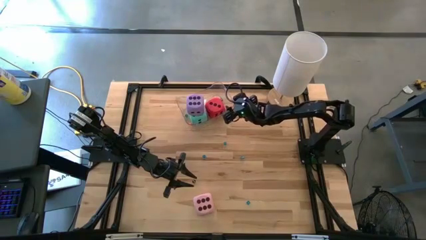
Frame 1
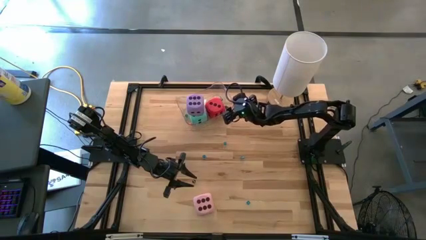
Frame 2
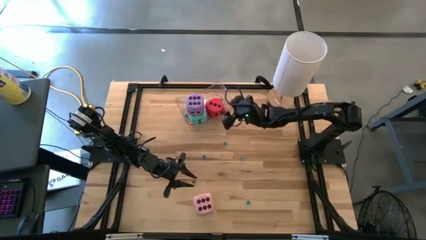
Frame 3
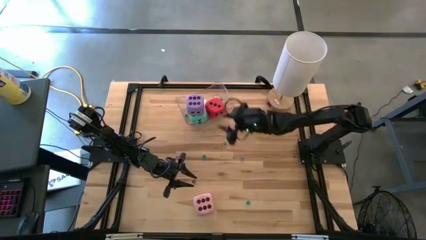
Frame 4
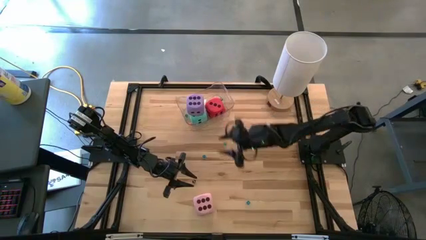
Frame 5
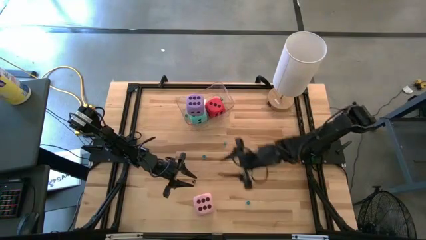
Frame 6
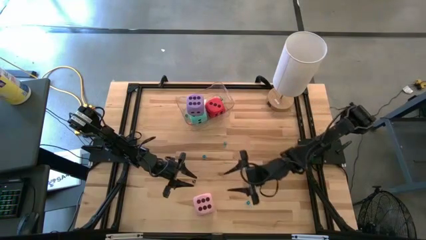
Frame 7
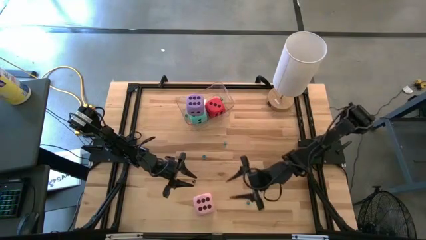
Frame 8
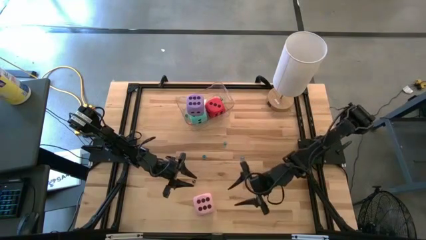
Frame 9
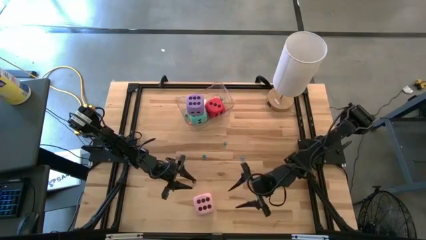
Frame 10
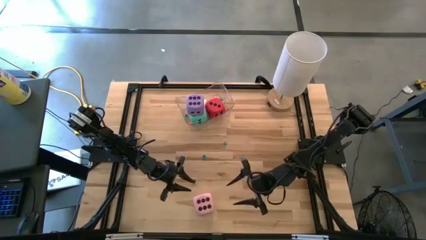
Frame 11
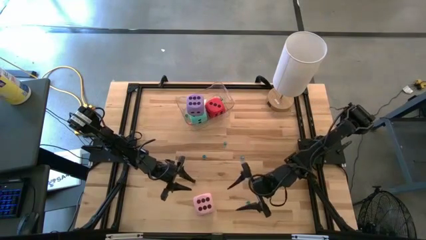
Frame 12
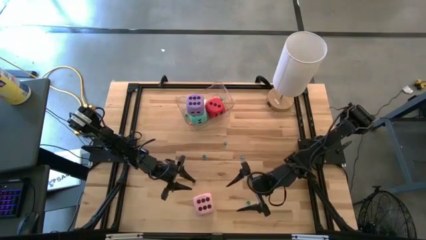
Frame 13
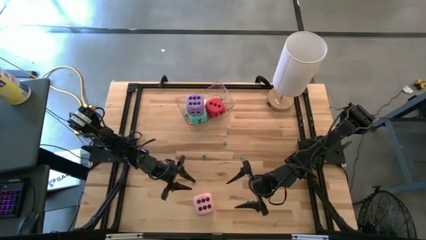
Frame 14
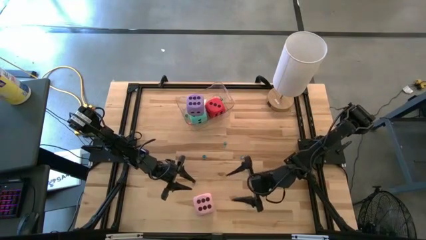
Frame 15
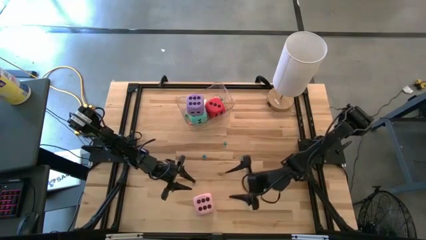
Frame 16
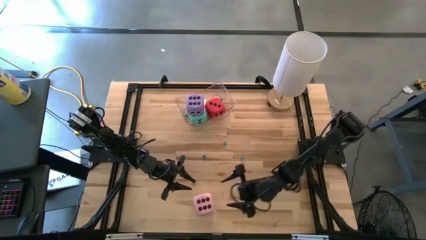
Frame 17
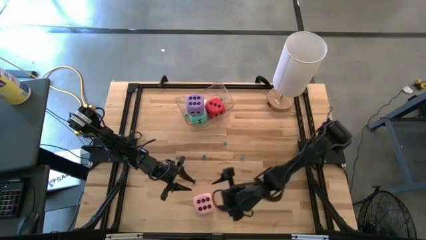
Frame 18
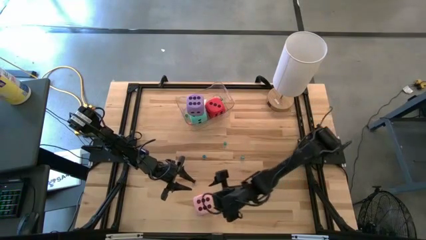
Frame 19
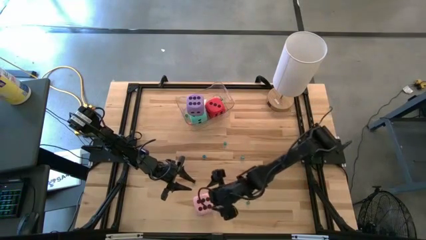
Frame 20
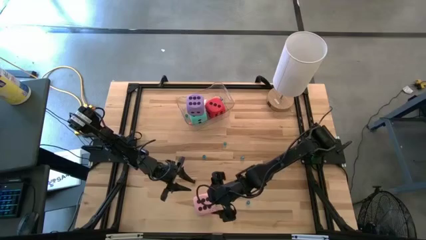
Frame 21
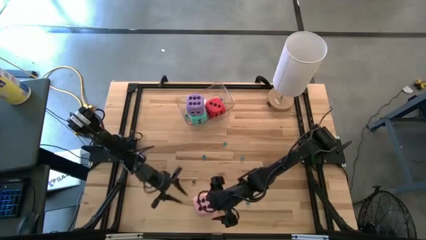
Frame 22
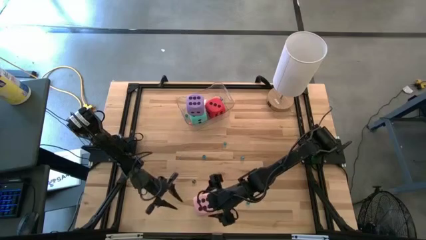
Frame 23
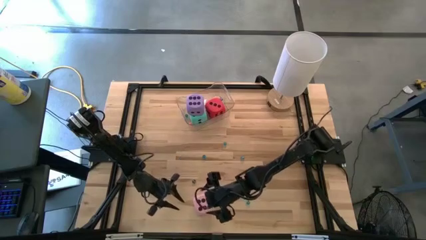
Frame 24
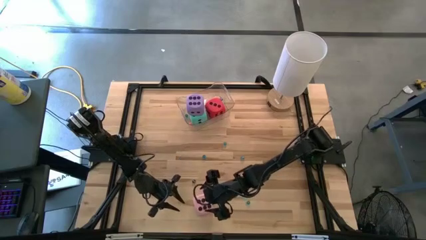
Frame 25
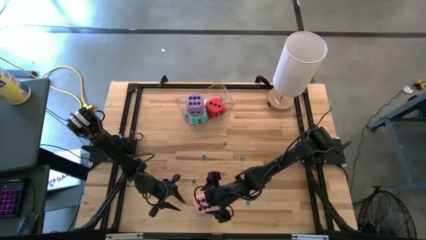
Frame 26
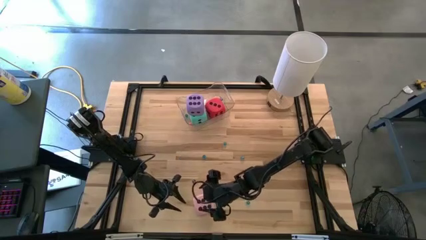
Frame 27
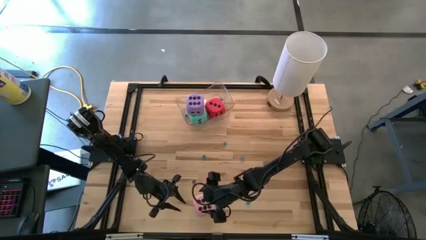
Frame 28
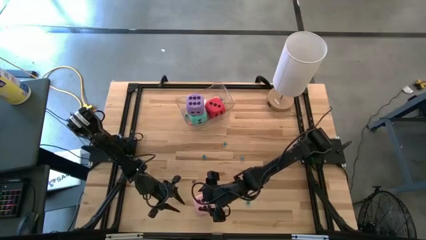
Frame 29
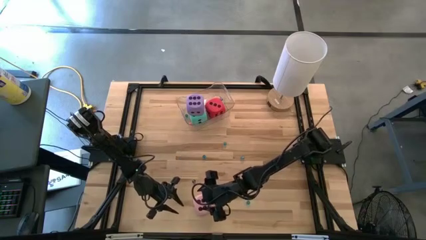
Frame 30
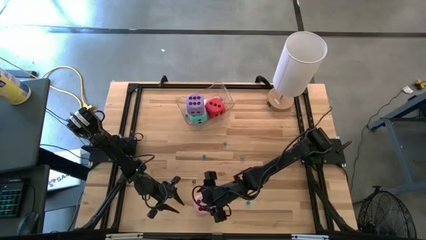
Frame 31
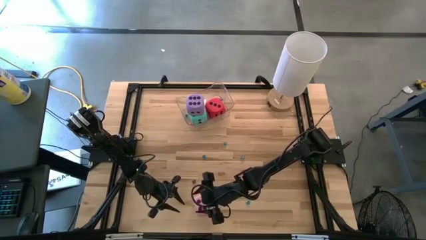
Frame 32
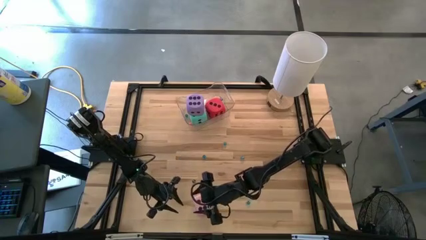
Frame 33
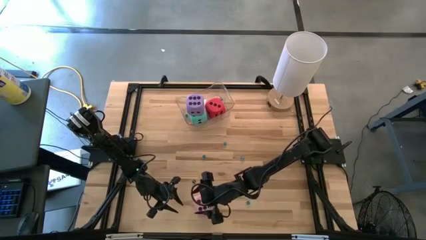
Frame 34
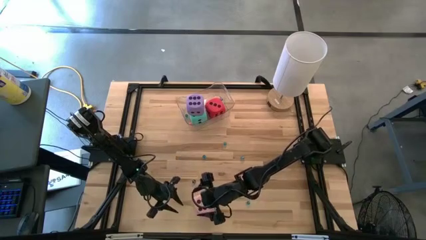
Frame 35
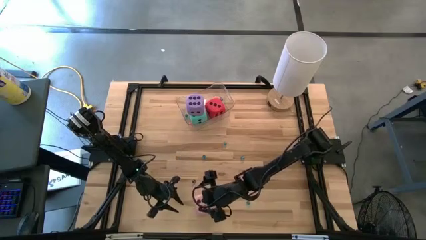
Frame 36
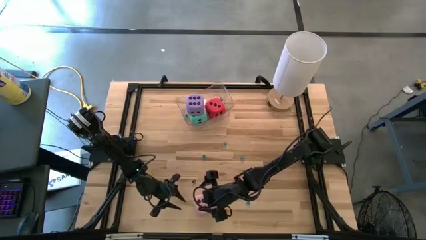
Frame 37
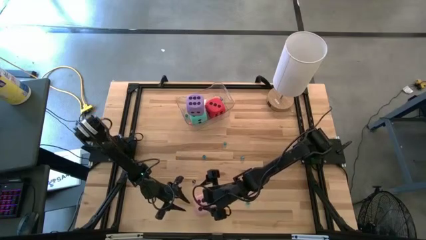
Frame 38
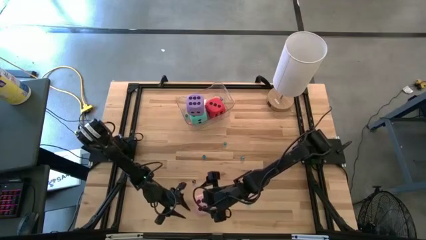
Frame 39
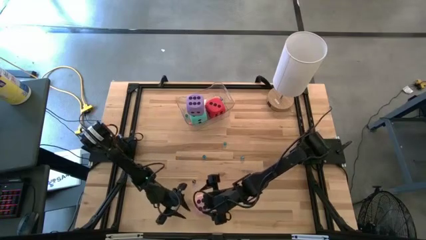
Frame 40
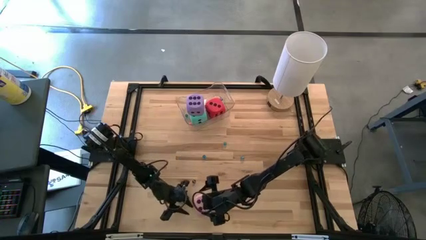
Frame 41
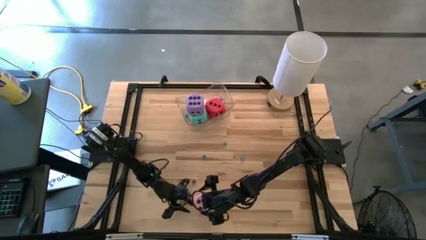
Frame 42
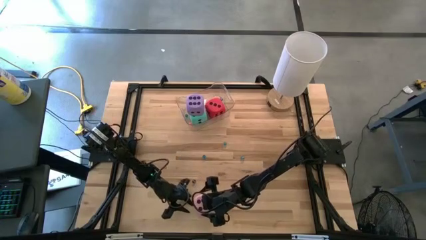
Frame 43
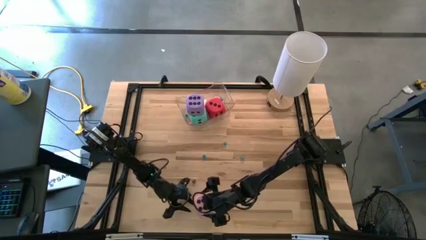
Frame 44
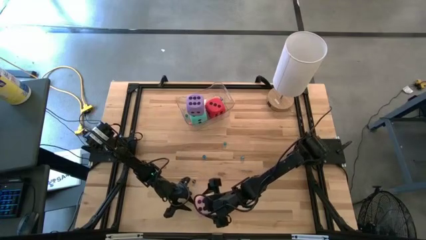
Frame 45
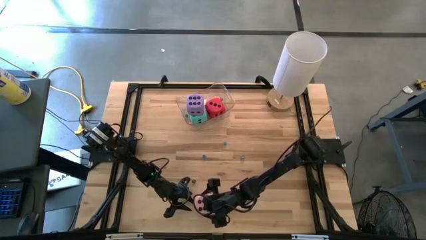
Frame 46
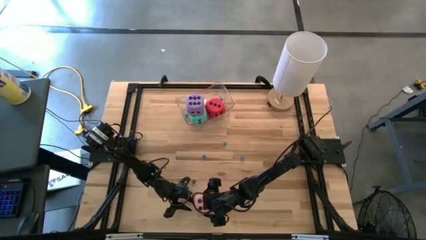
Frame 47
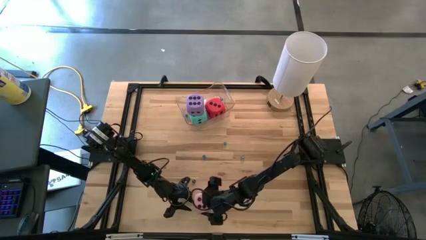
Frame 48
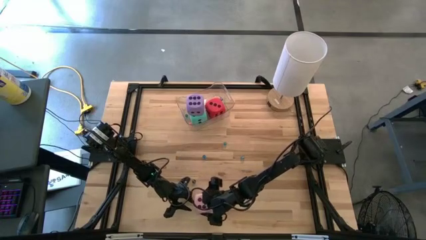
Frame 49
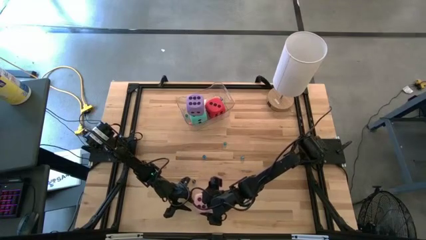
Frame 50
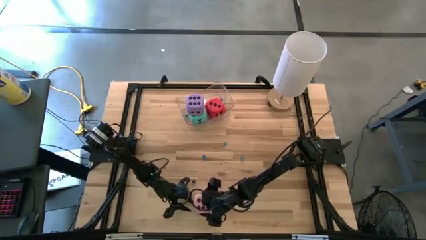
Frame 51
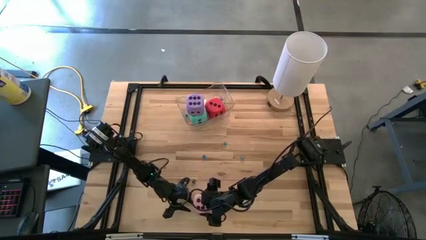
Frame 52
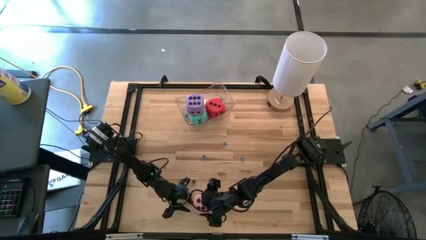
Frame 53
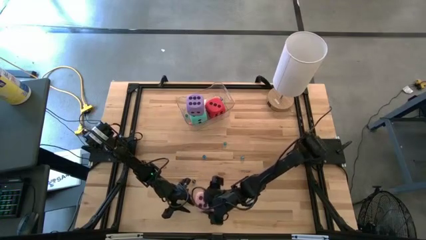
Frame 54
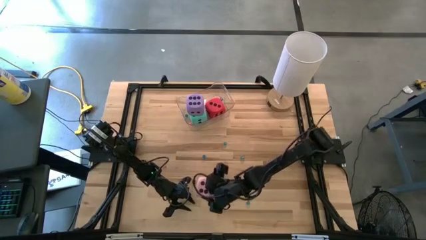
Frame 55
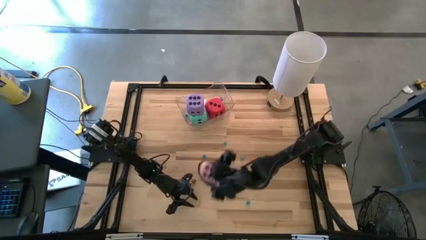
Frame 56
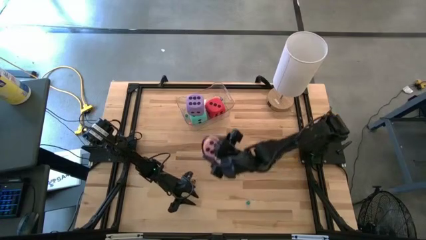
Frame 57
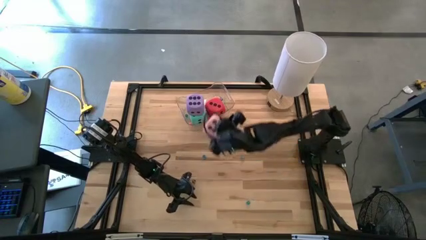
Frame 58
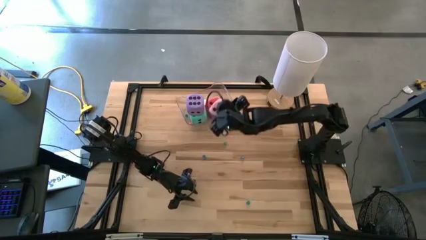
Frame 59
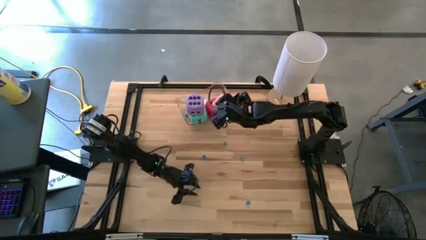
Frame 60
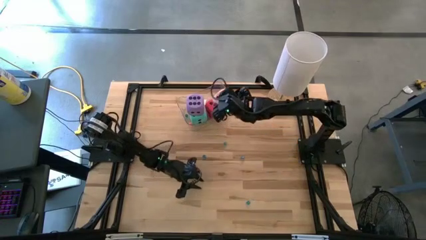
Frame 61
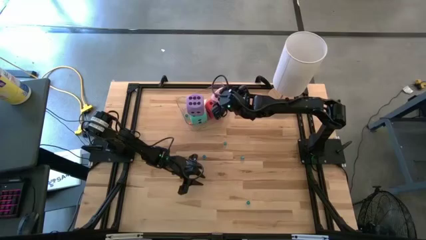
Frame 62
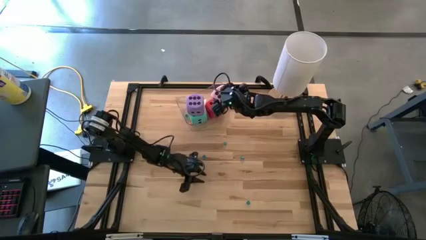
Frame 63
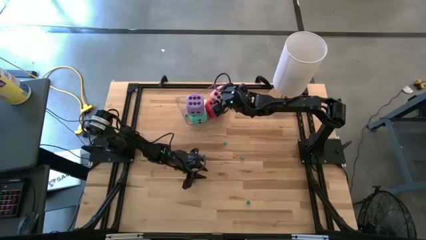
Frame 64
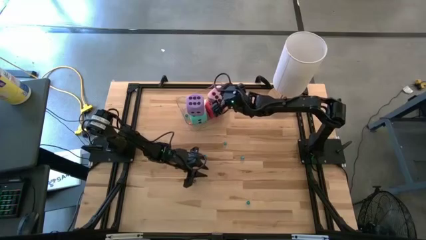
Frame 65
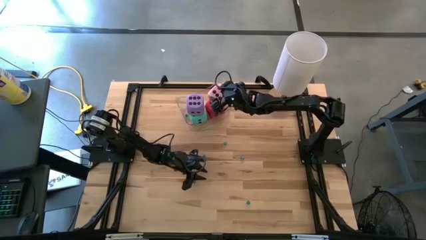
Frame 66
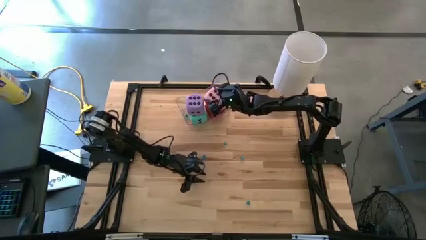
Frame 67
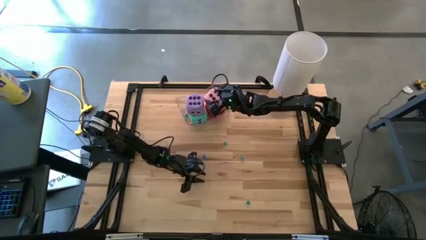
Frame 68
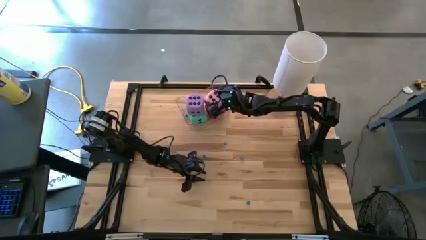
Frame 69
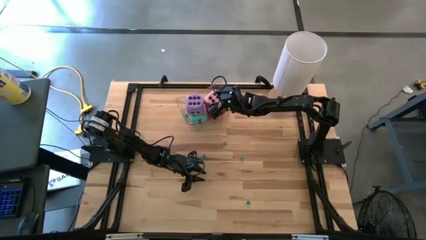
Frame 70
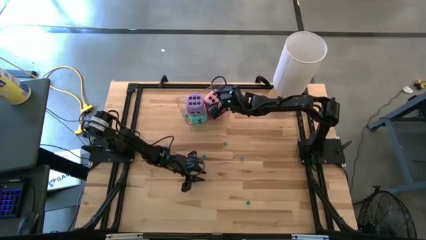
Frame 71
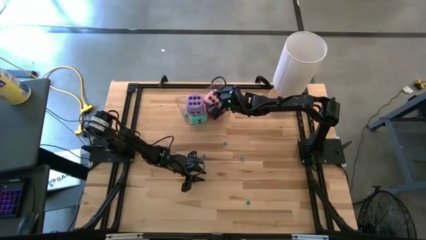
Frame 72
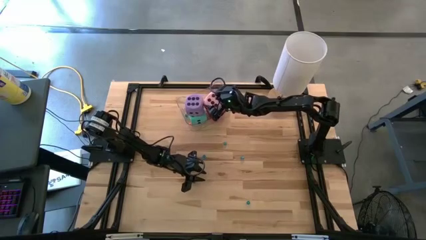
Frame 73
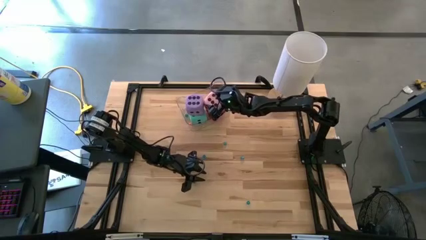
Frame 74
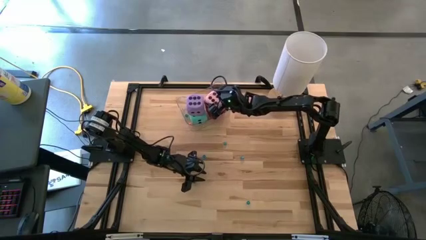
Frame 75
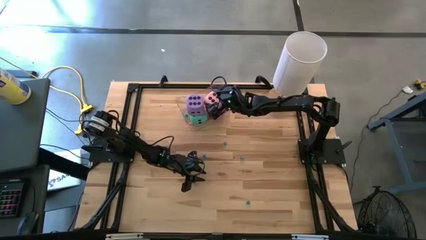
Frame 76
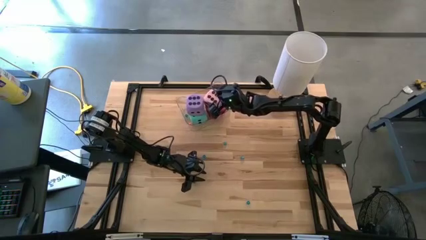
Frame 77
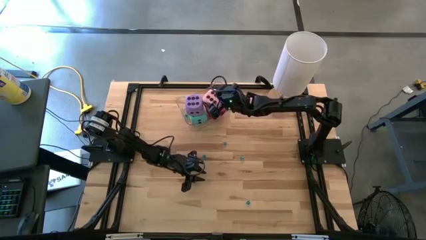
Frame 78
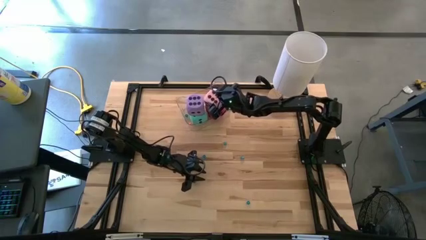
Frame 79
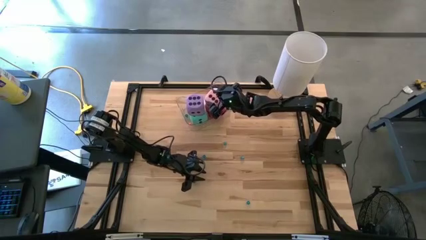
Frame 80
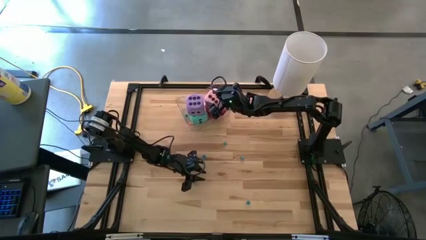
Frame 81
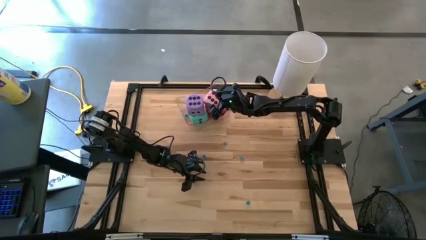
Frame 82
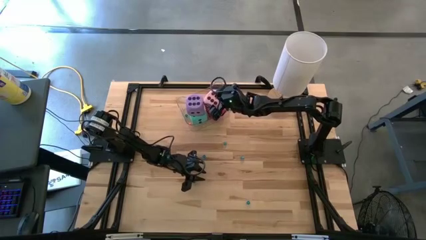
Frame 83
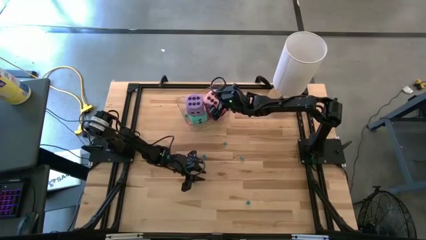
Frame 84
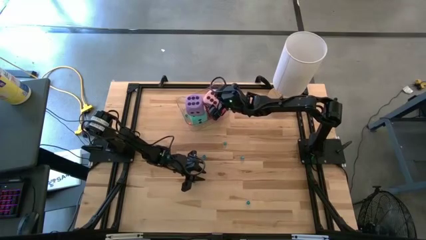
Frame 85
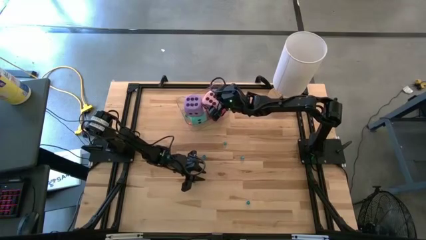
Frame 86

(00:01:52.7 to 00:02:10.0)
Task: Pick & Place Dice
Put the large pink dice in the transparent bin
